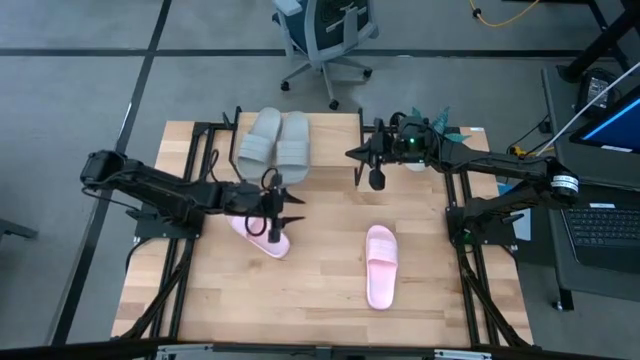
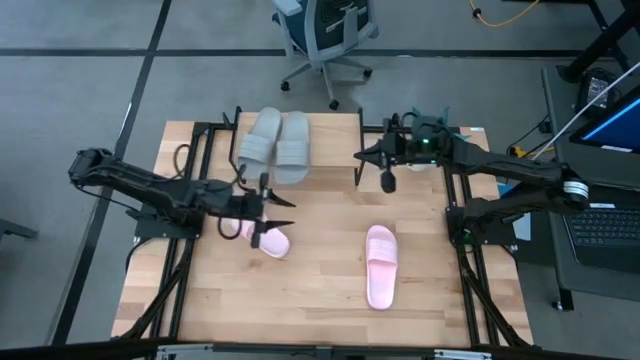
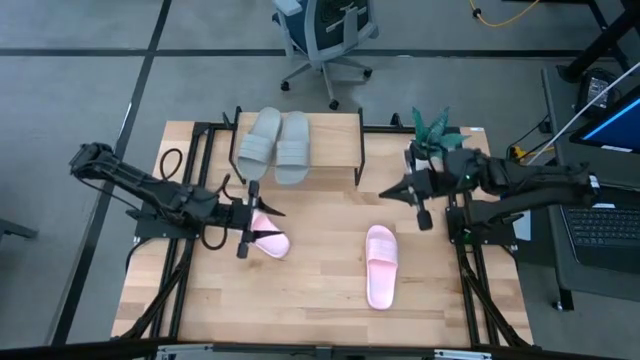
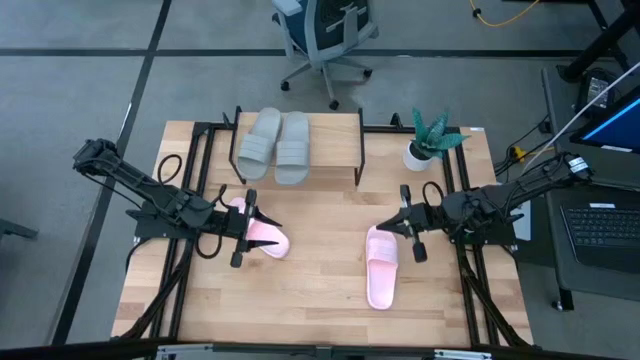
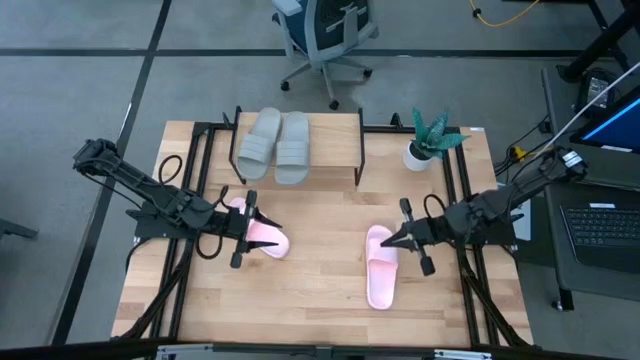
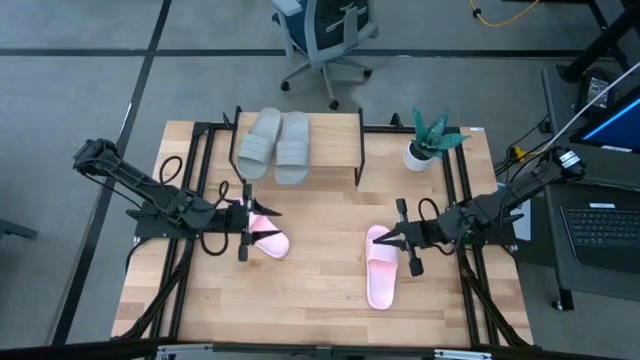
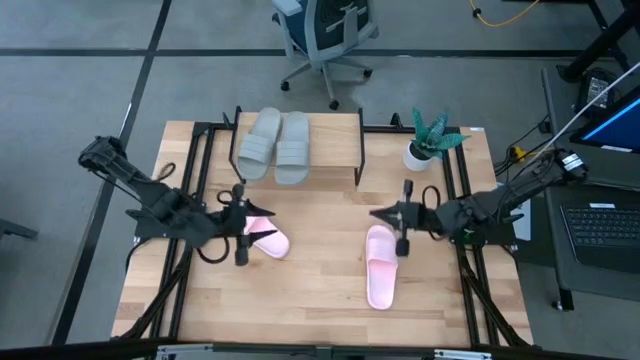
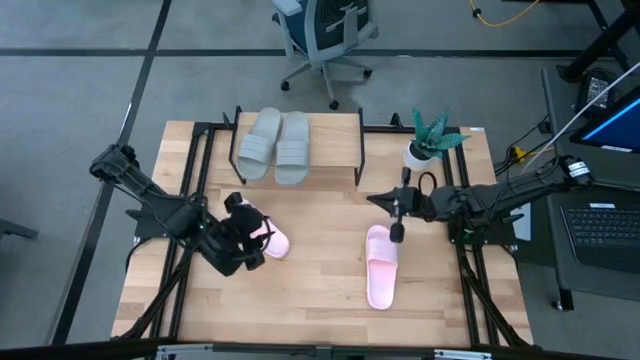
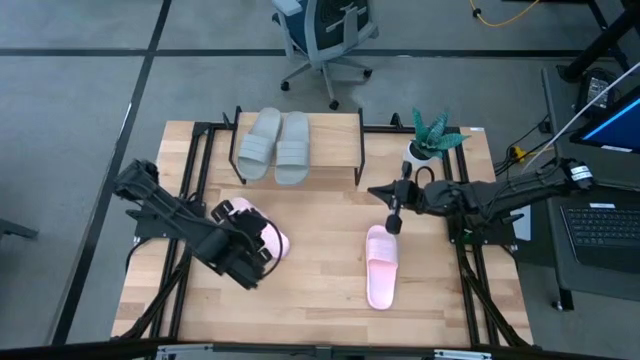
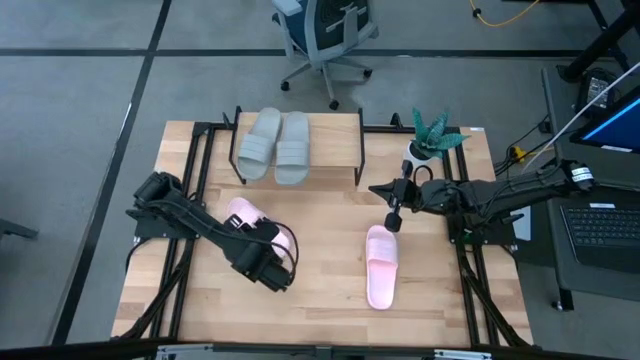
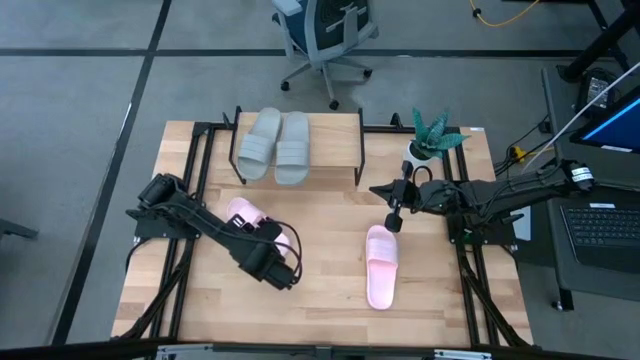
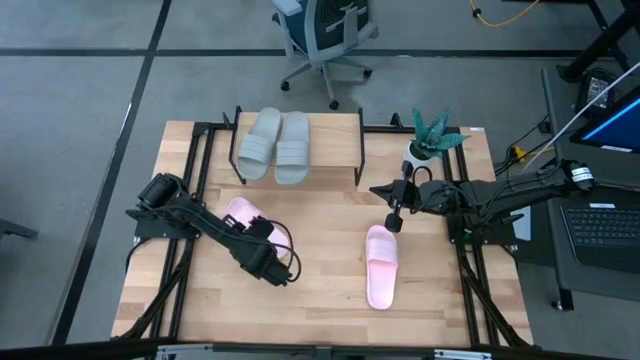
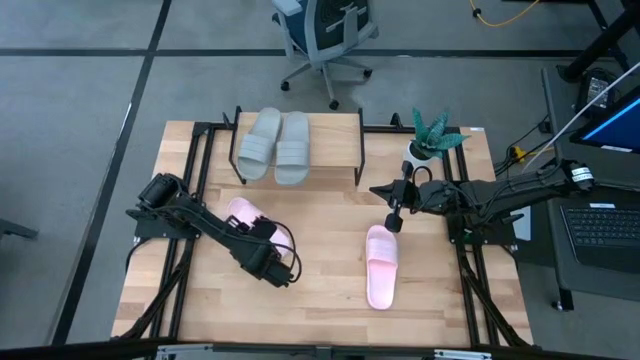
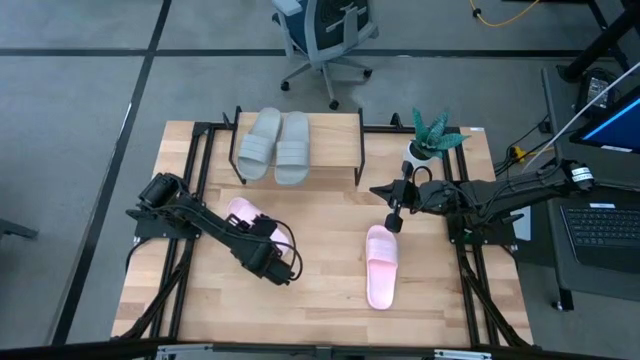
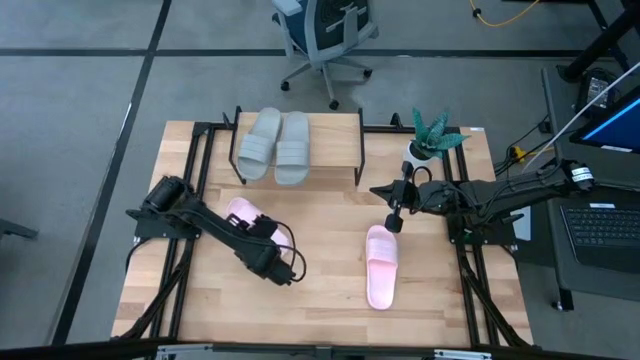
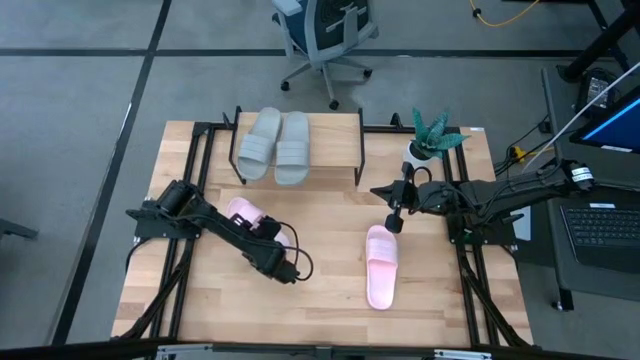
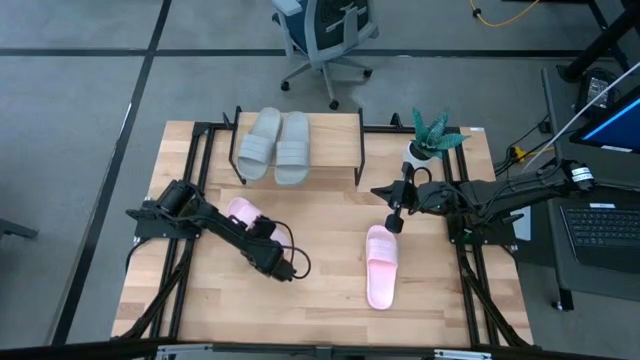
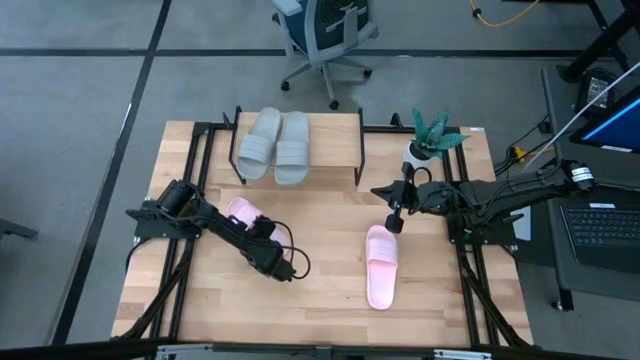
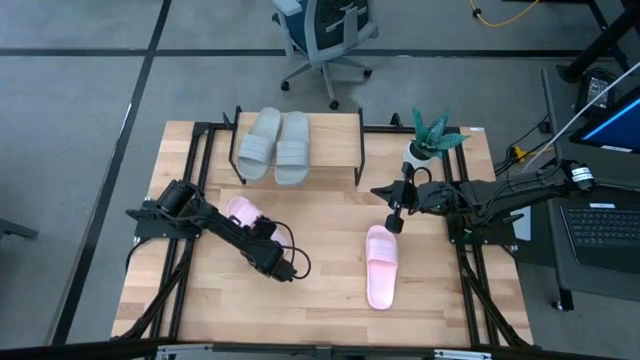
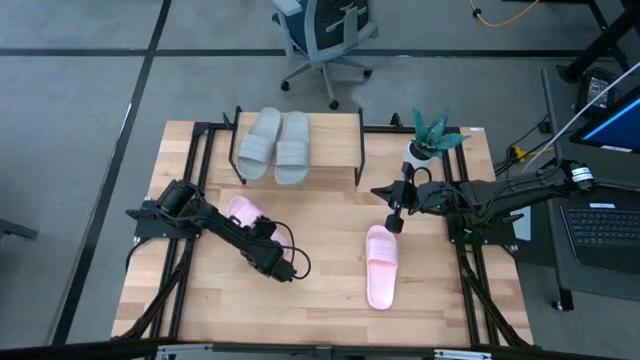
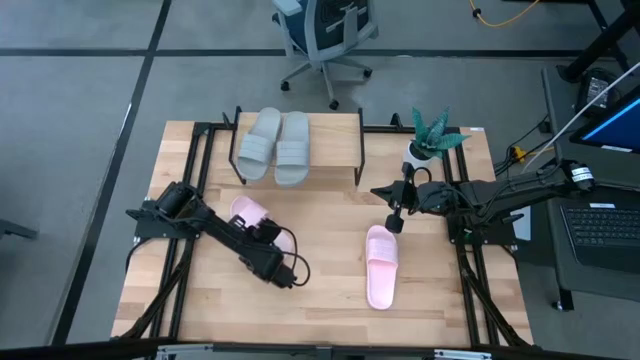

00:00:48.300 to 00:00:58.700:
Task: Pick and place slides into the shelf
Put the left pink slipper on the shelf

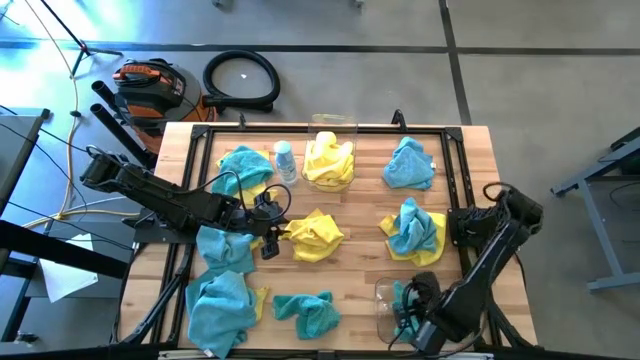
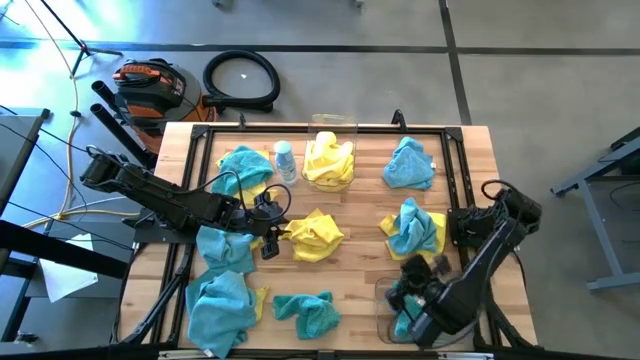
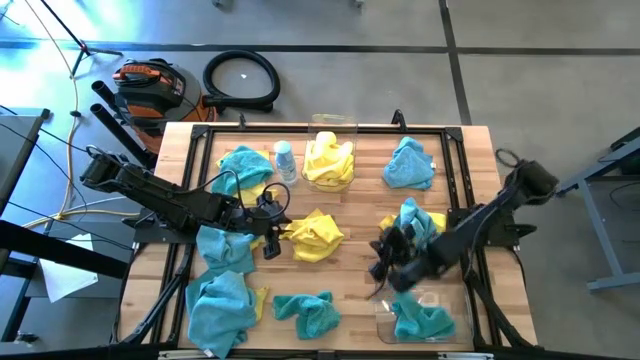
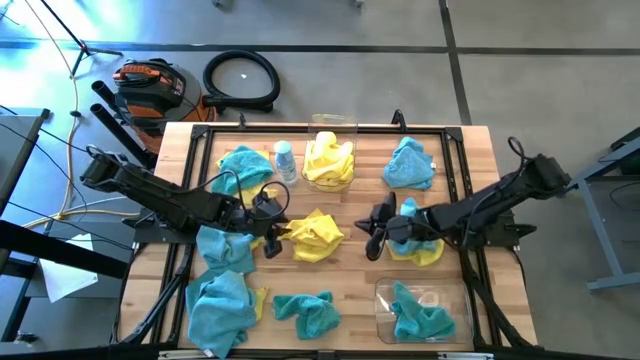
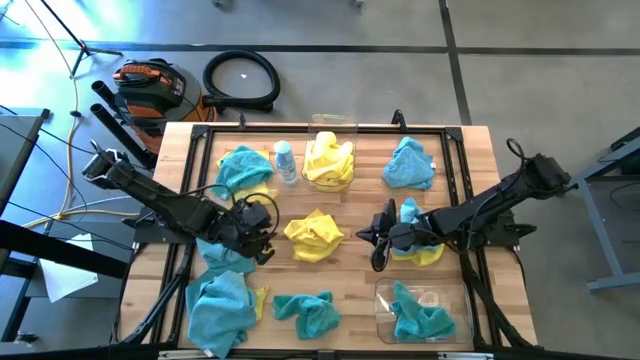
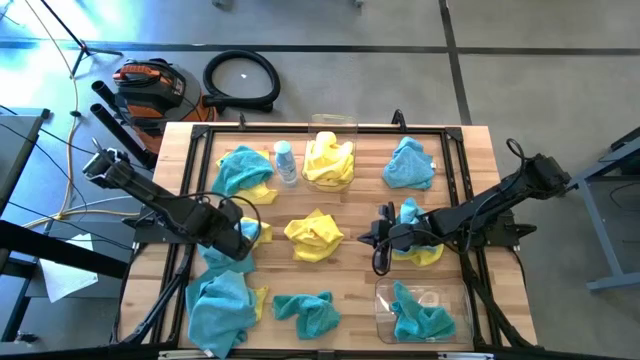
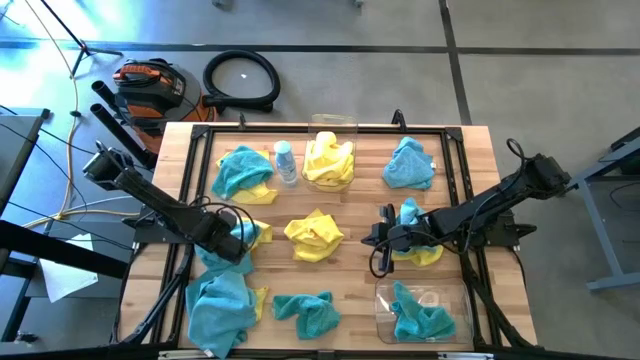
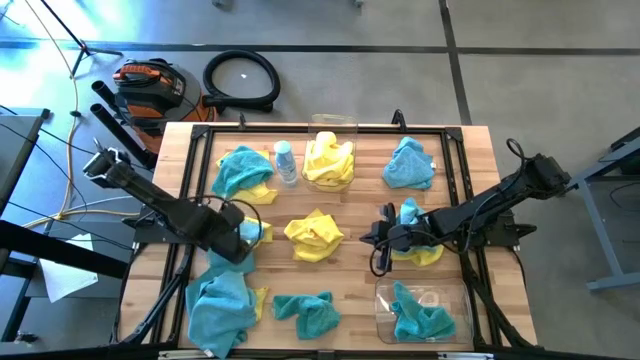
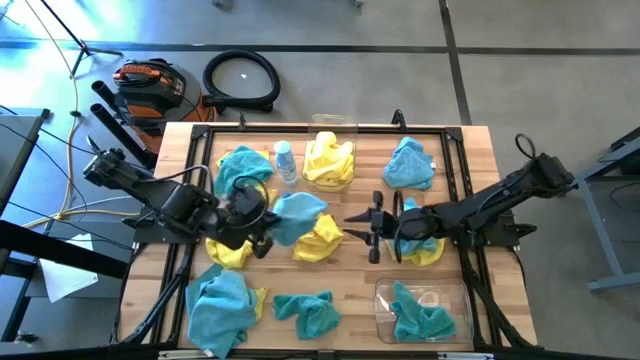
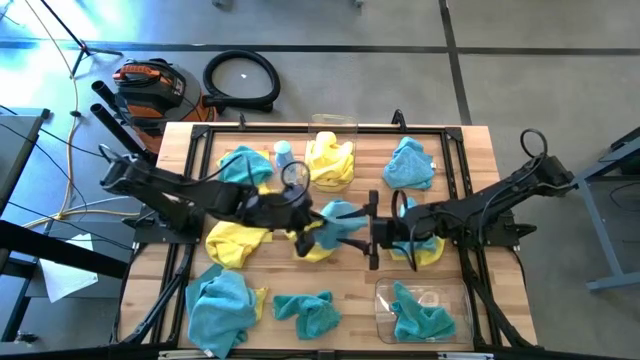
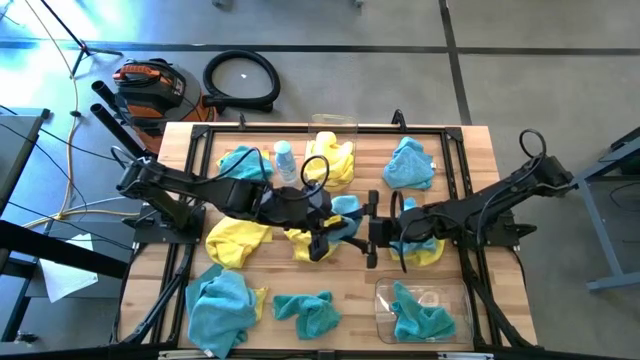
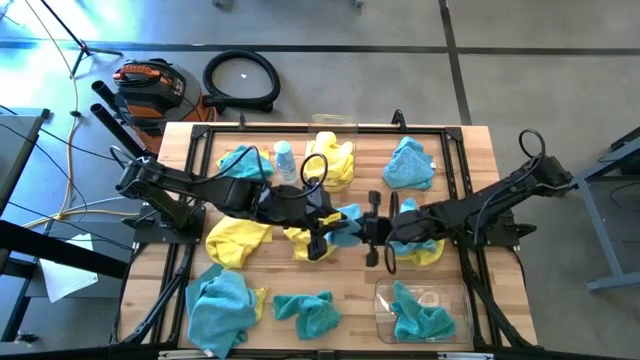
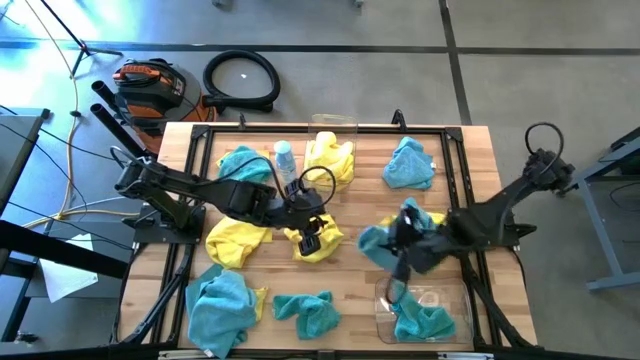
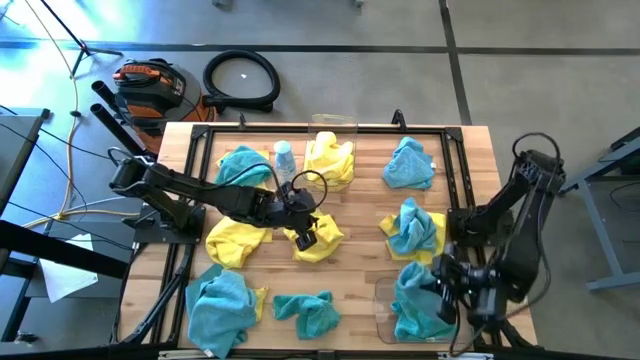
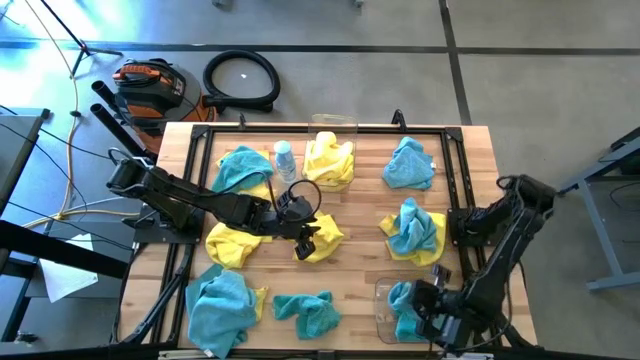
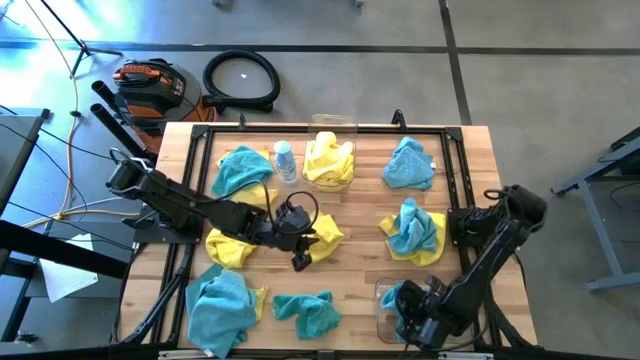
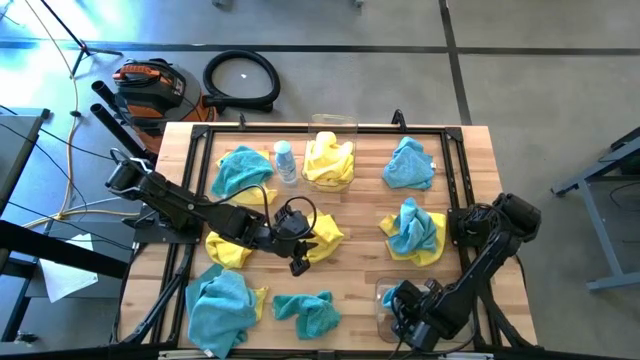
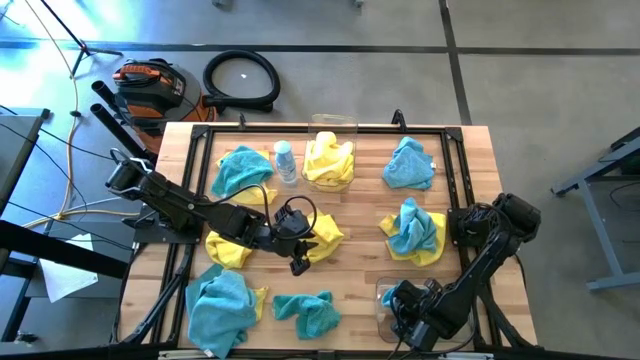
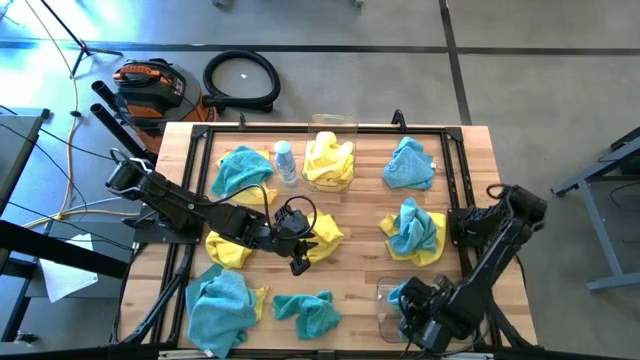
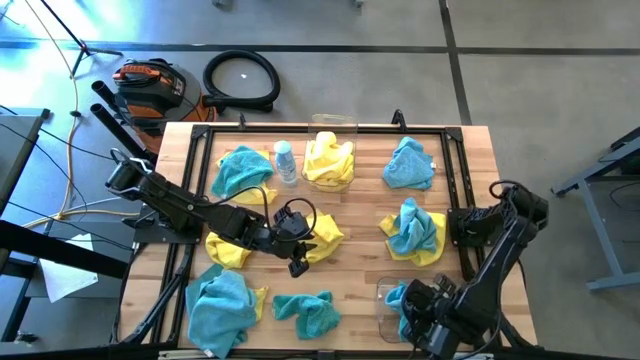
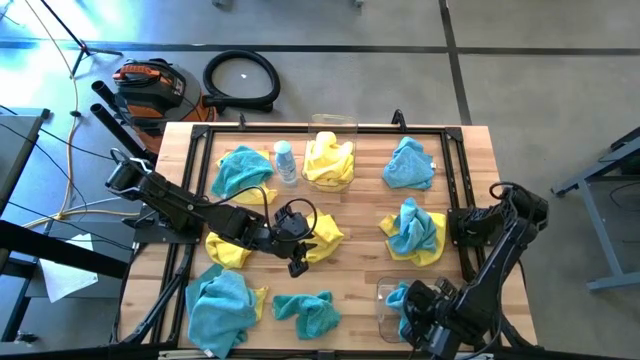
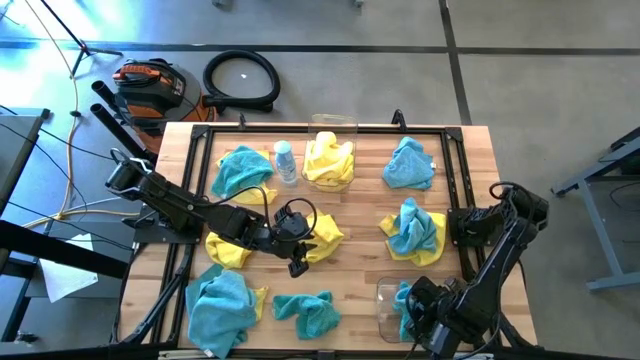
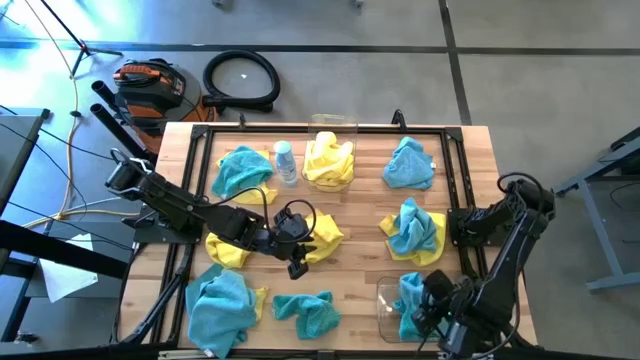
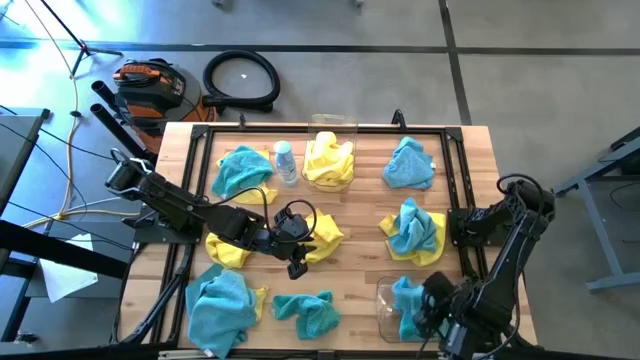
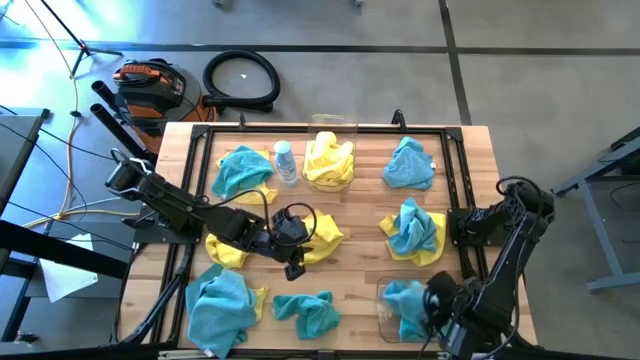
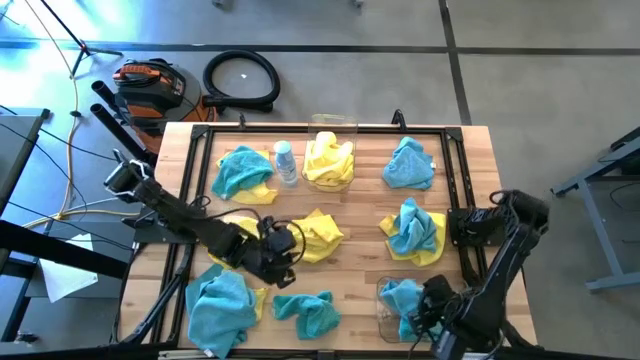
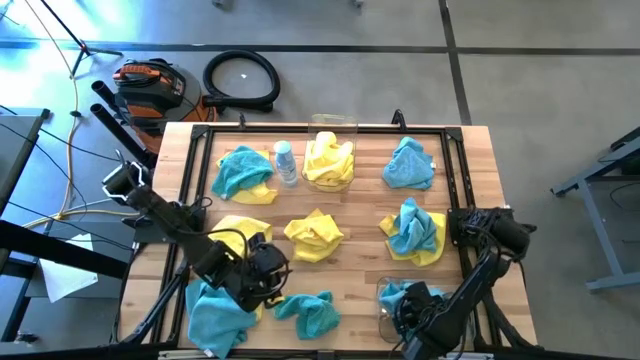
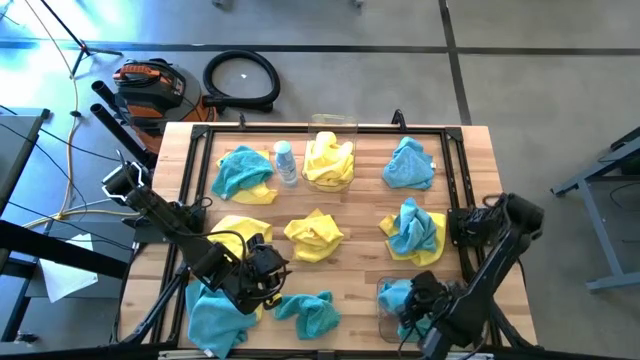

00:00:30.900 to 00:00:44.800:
Task: Sort microfiber towel by color & place in baskets
Put the blue towel into the bottom transparent bin
